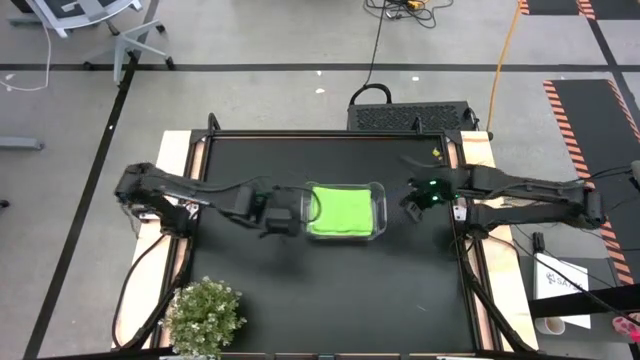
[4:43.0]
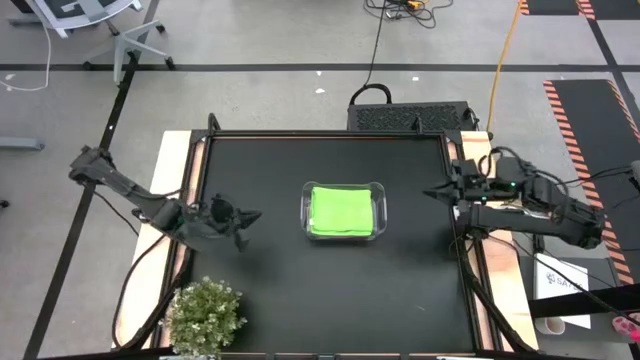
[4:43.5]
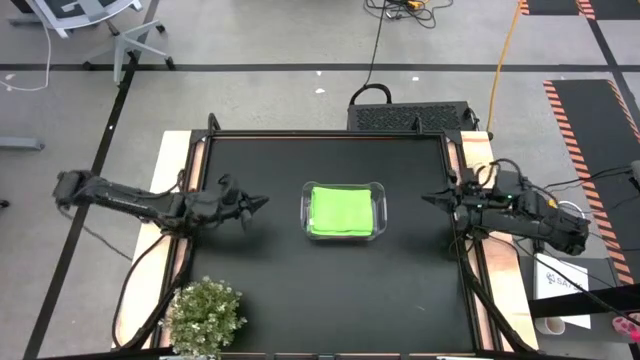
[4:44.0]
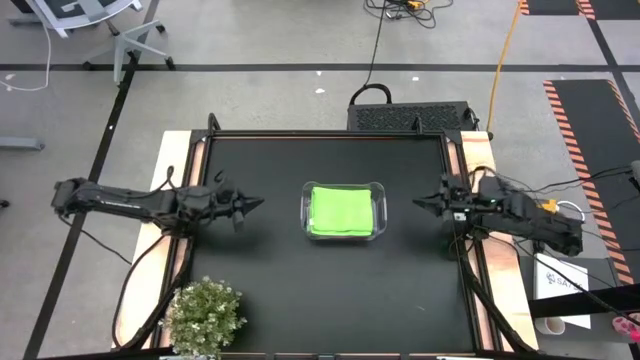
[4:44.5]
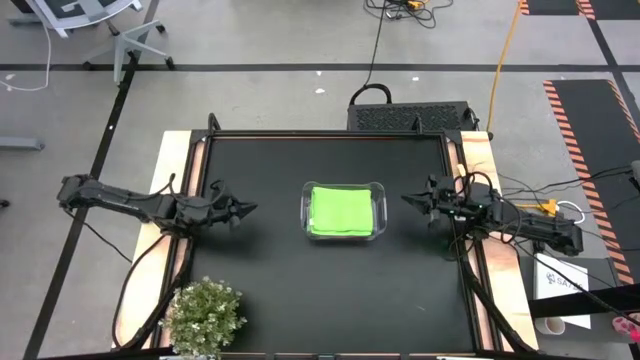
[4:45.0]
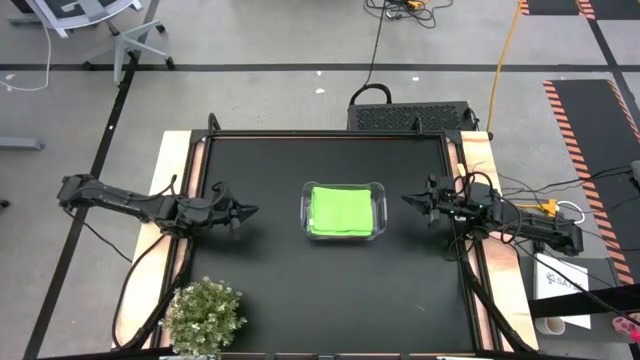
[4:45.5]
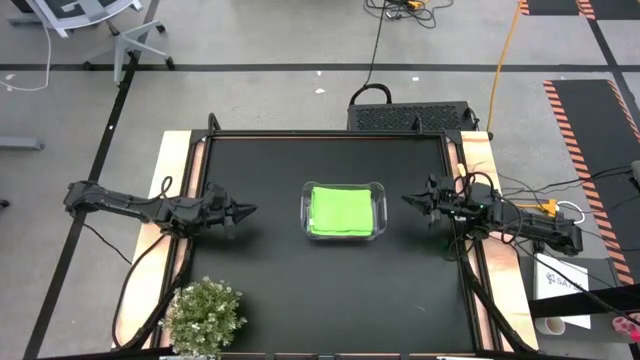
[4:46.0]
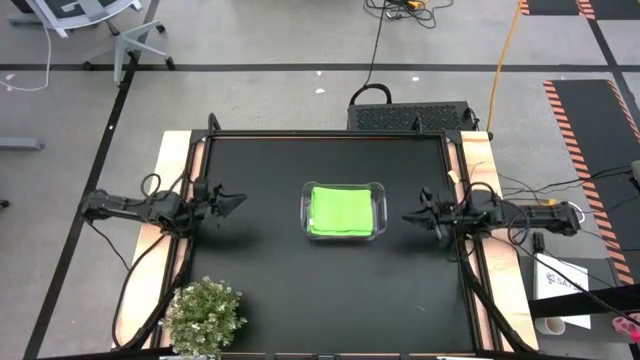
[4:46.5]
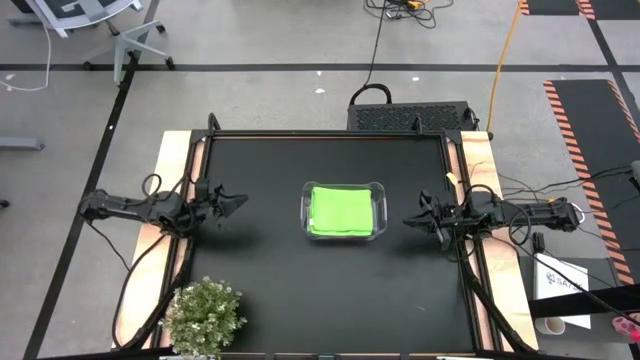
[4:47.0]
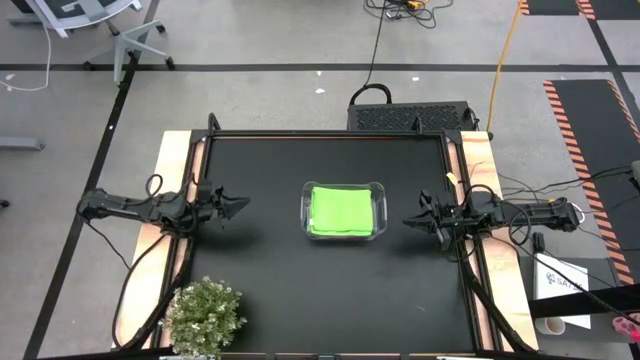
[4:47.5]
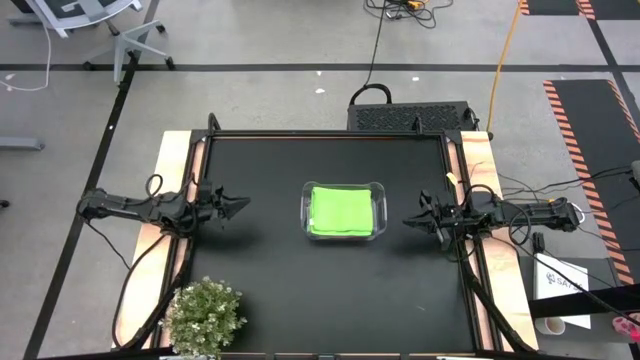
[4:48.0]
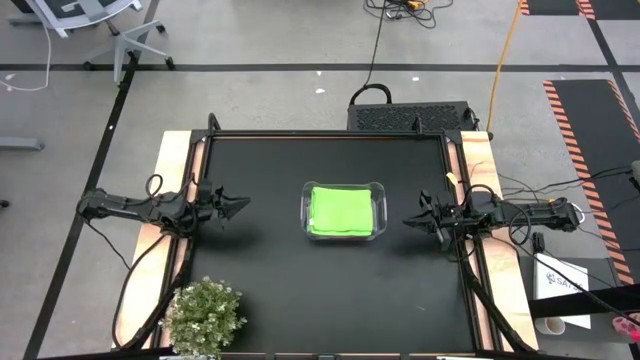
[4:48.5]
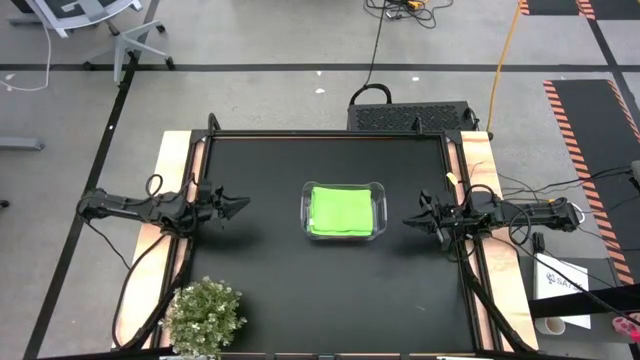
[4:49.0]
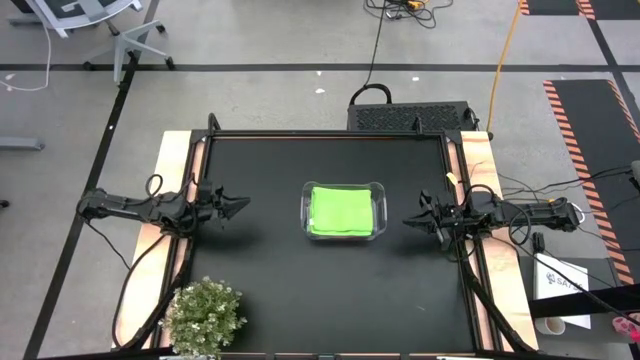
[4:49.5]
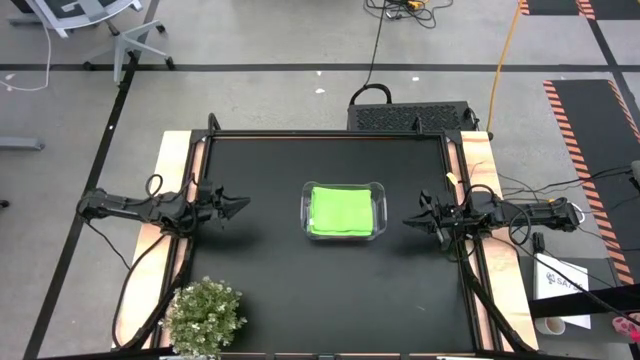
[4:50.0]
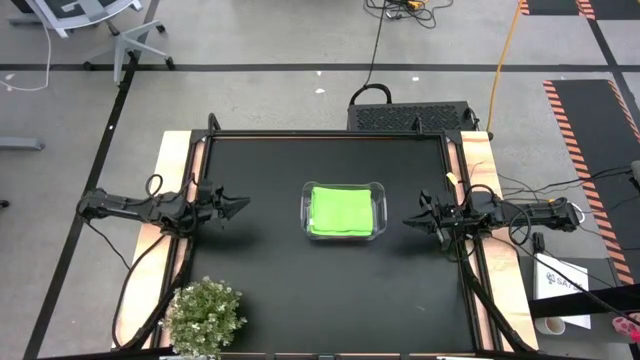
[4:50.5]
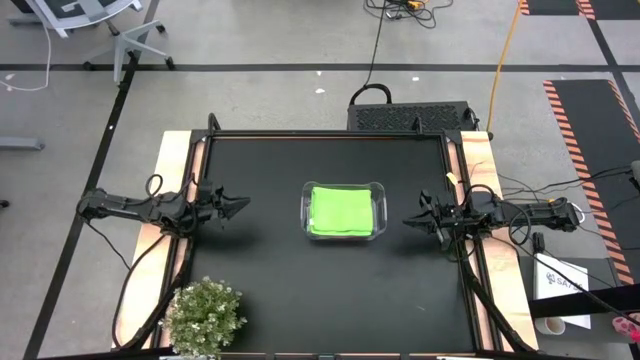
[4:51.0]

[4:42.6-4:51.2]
Task: Fold microfiber towels
Return to home position

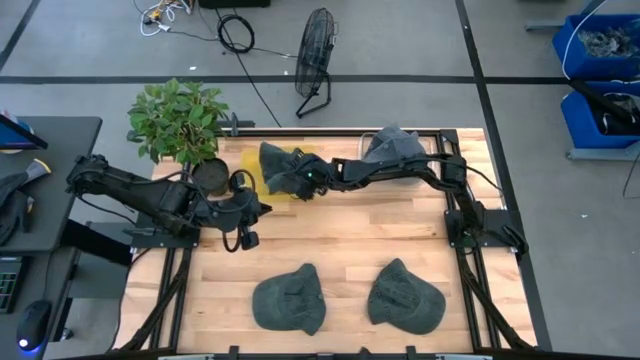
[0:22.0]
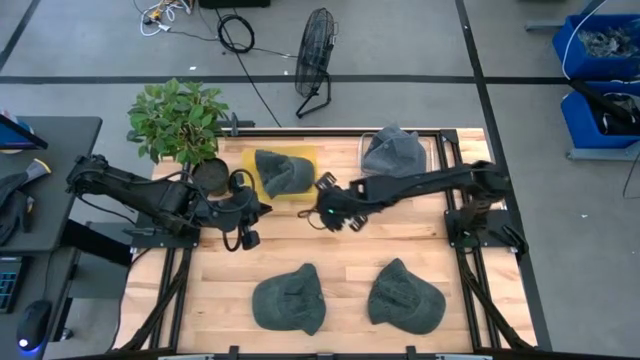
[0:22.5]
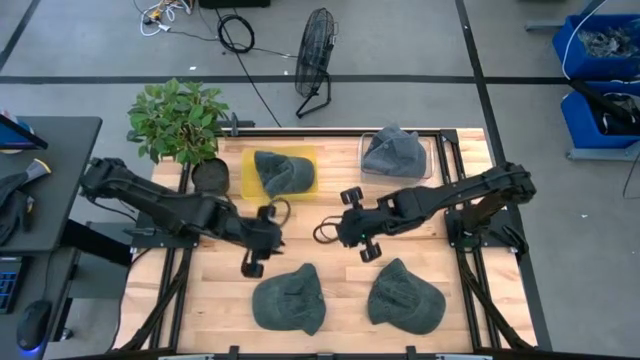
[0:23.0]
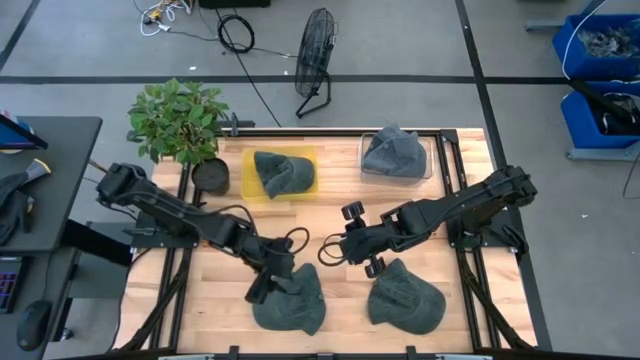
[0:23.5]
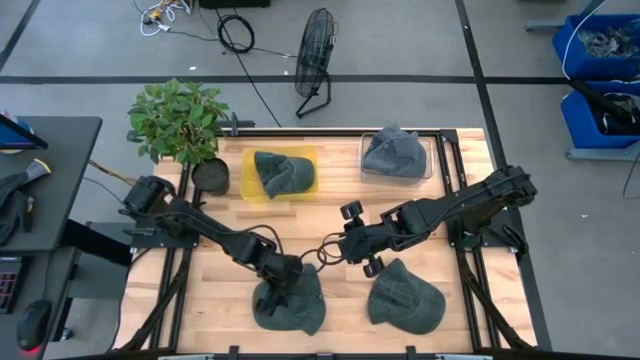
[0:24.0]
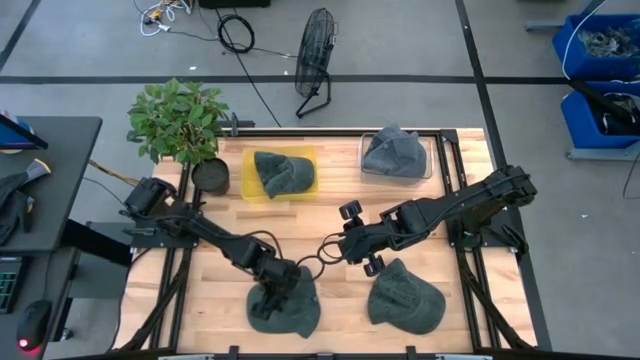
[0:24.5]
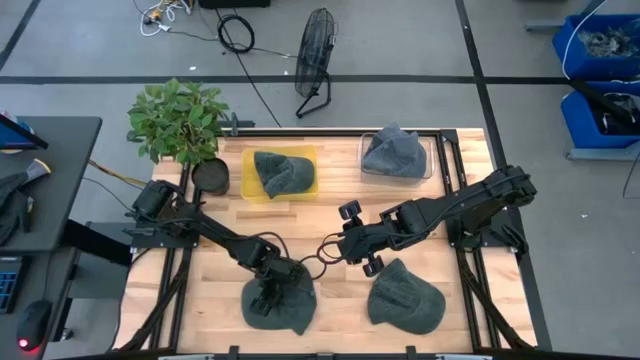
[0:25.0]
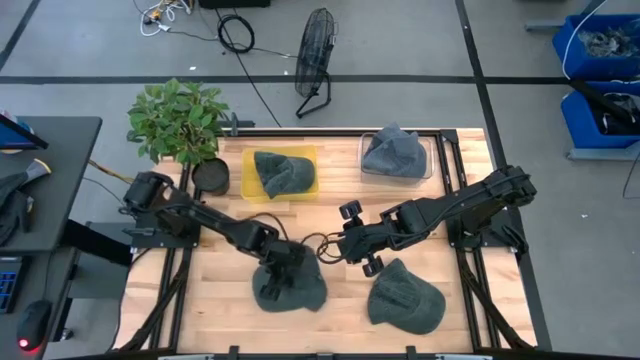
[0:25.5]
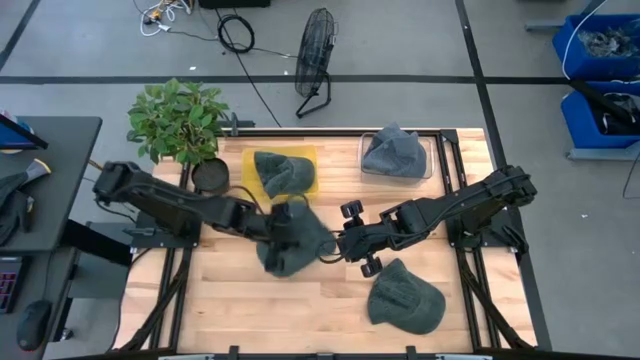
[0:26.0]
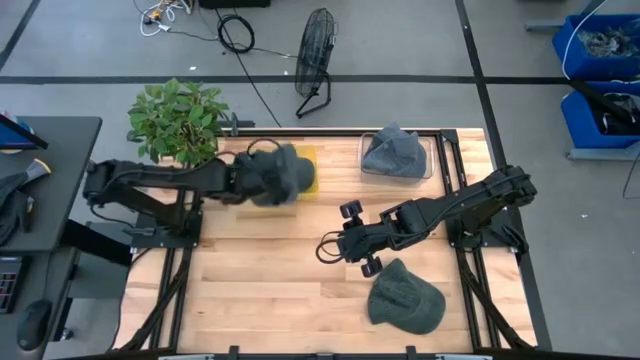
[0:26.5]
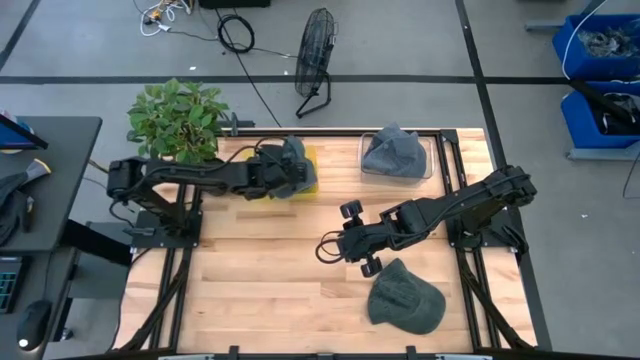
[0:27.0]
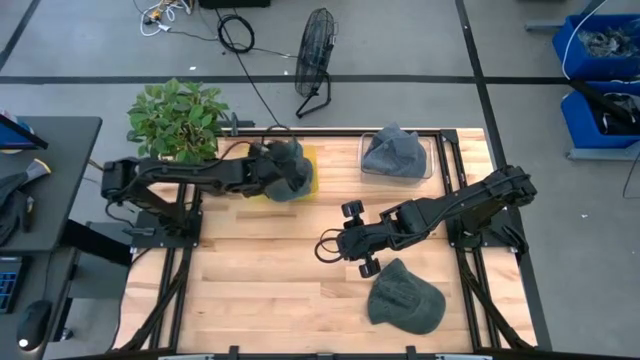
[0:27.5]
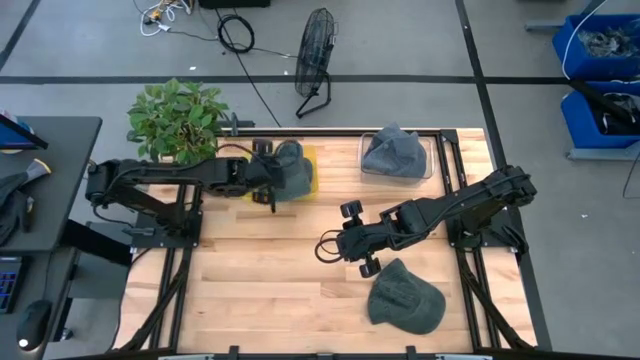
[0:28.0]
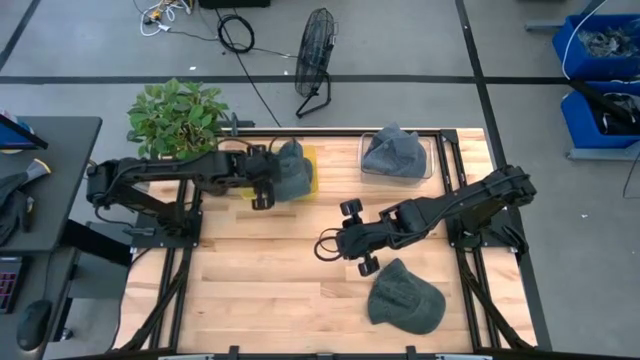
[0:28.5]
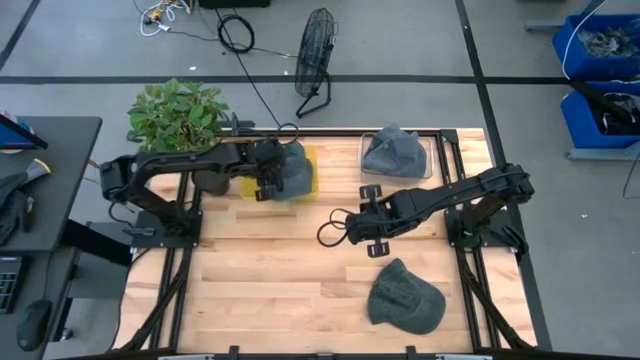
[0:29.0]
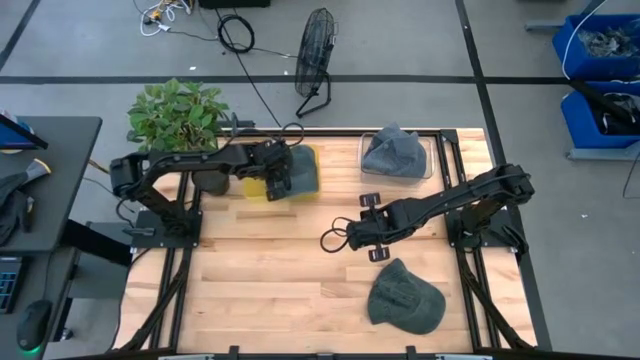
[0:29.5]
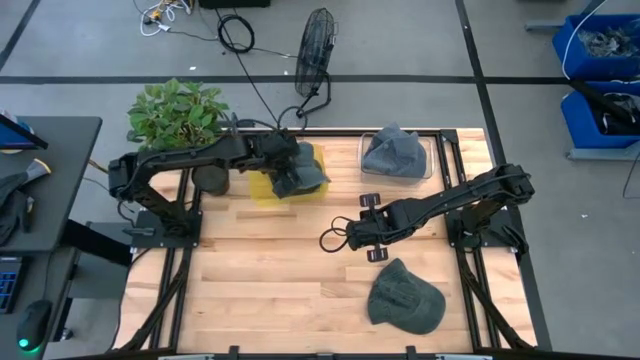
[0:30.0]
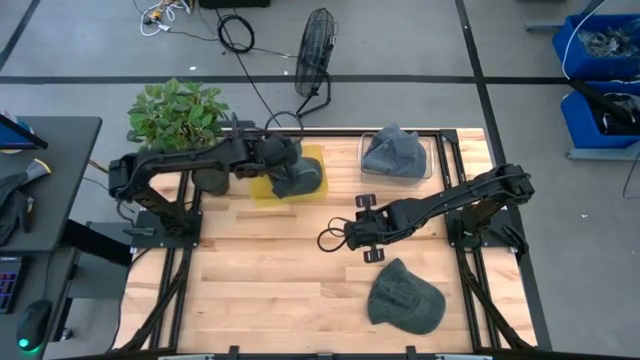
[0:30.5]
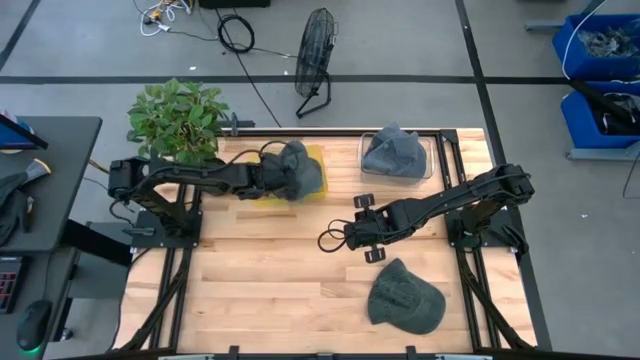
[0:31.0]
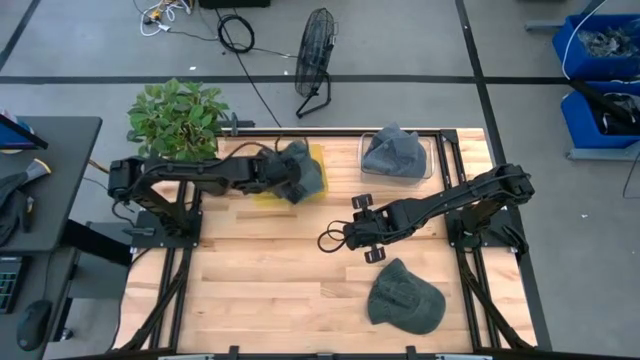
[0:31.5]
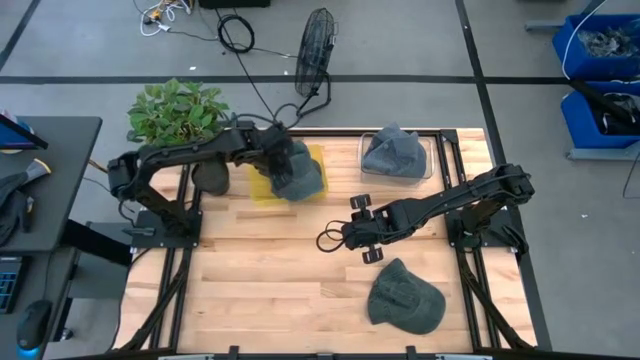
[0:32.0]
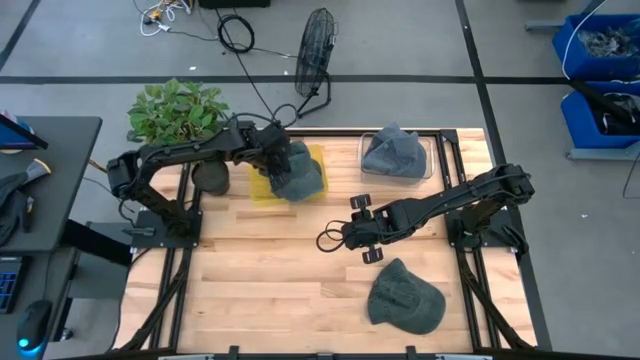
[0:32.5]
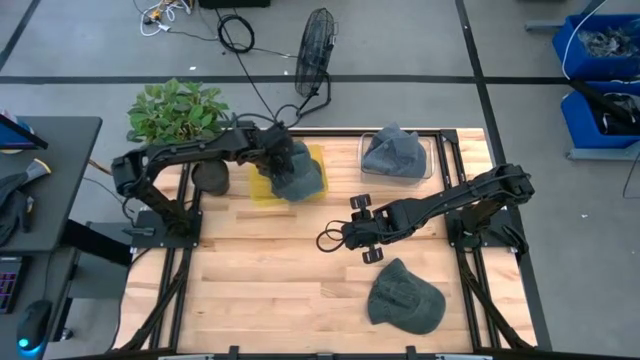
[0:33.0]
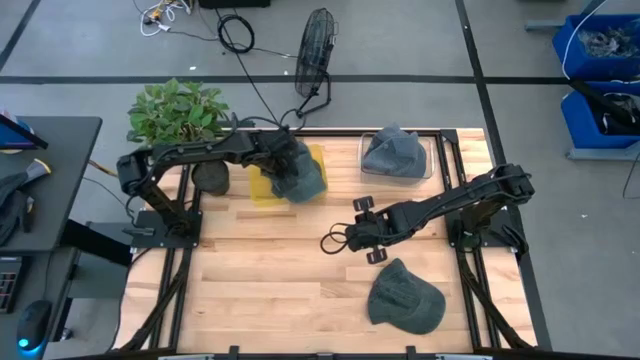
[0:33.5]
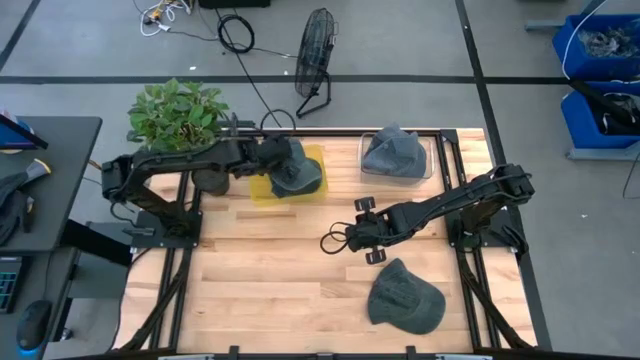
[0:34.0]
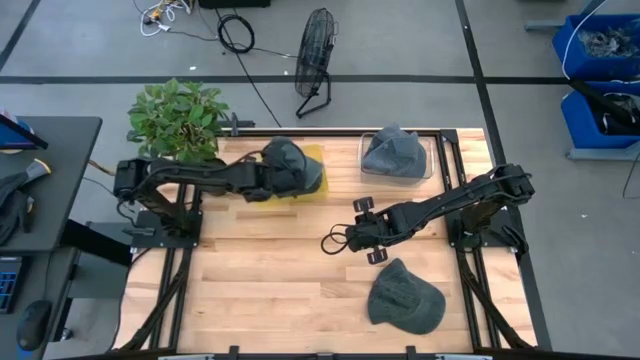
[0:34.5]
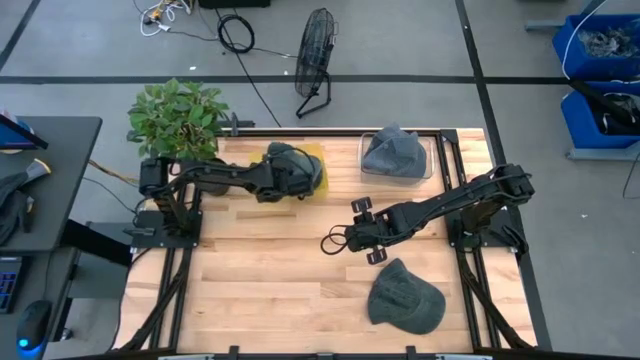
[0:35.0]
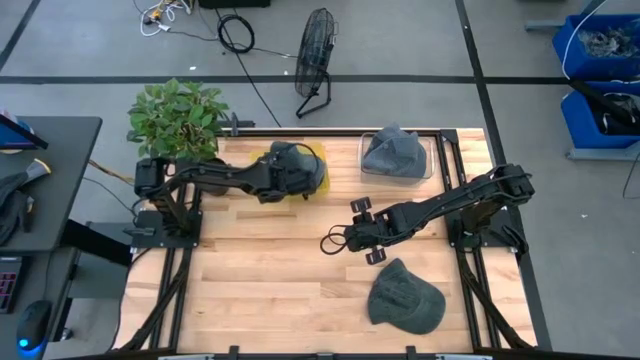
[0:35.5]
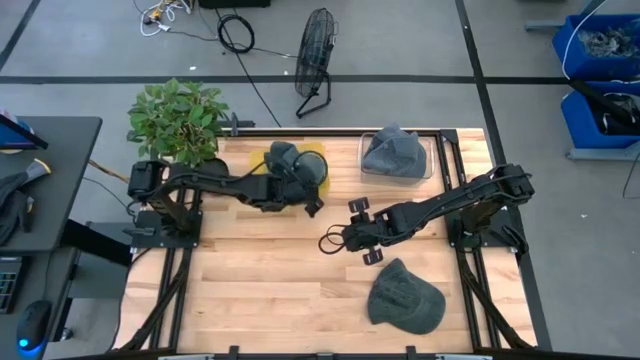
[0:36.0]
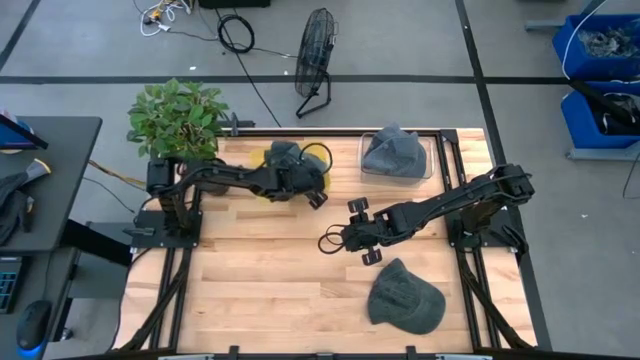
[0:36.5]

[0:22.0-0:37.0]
Task: Pick & Place hat
Put the left black cap into the yellow bin
